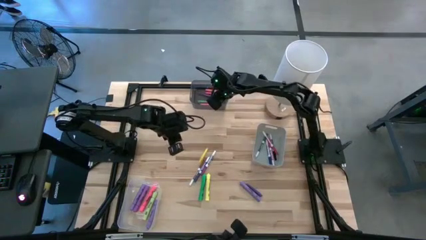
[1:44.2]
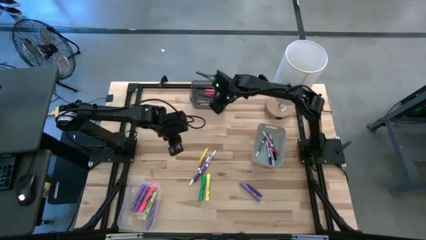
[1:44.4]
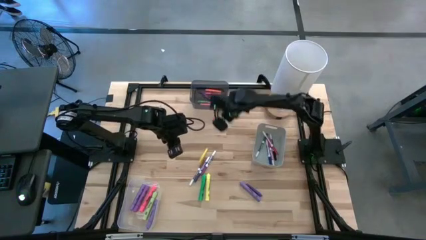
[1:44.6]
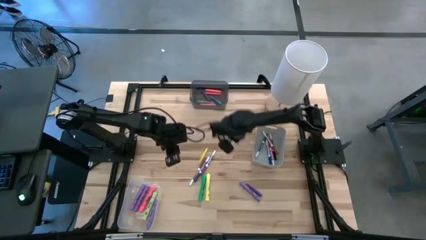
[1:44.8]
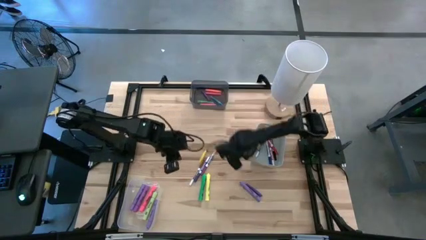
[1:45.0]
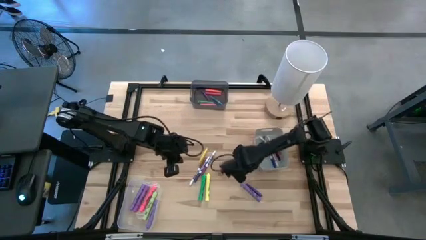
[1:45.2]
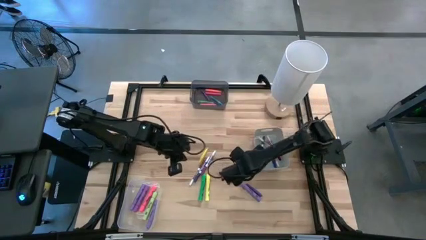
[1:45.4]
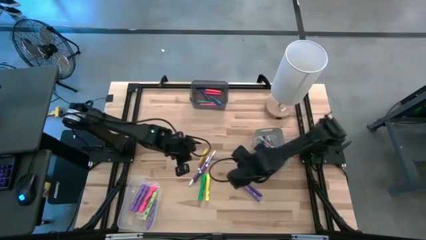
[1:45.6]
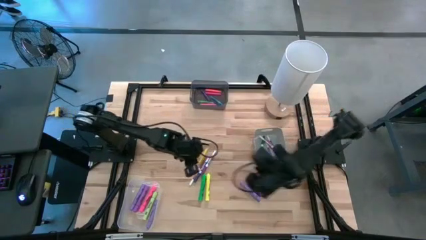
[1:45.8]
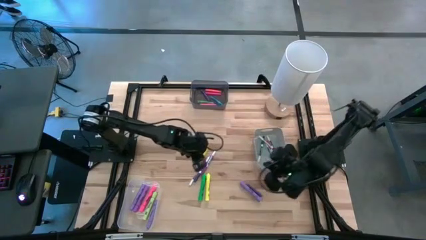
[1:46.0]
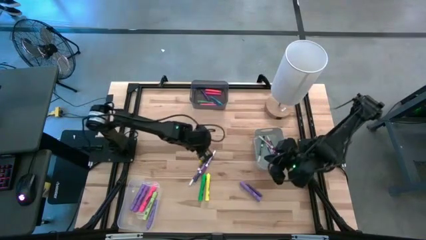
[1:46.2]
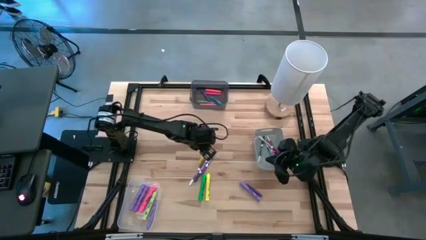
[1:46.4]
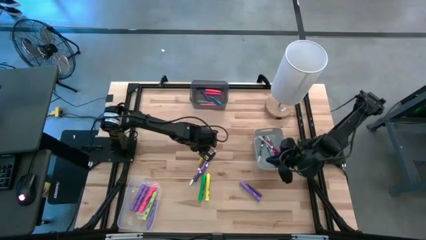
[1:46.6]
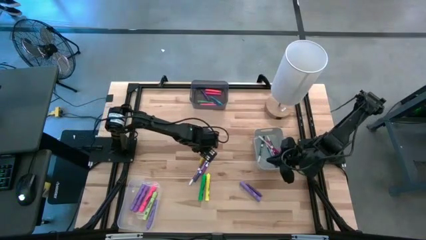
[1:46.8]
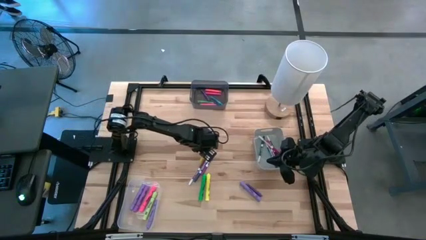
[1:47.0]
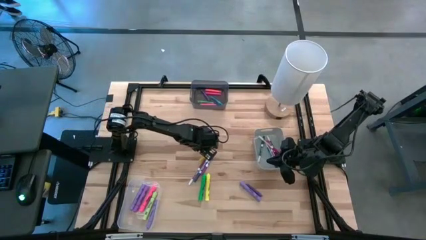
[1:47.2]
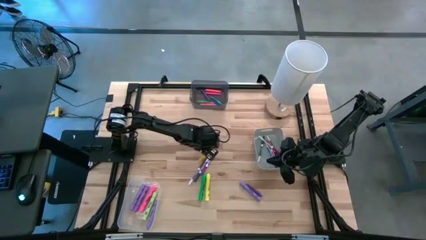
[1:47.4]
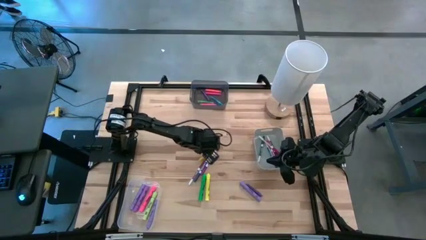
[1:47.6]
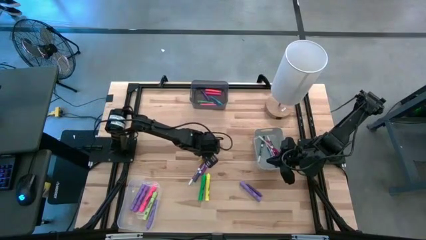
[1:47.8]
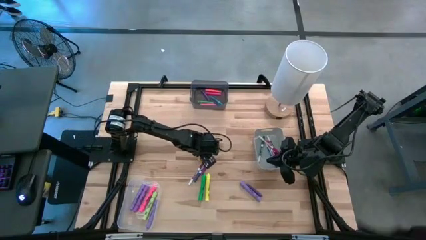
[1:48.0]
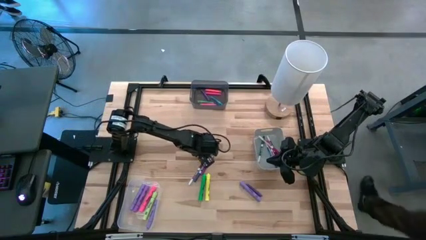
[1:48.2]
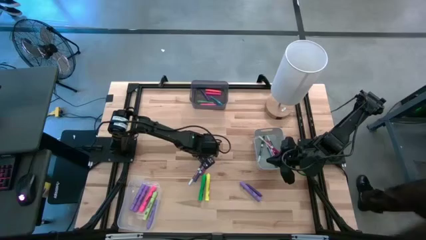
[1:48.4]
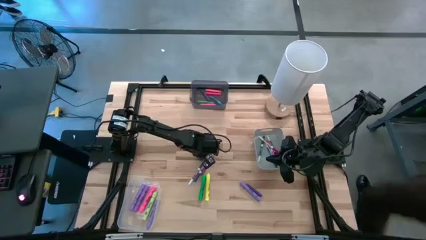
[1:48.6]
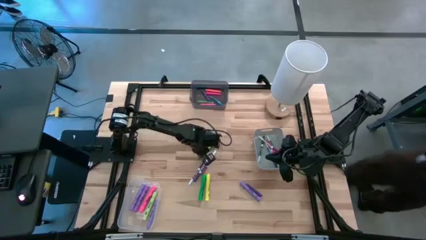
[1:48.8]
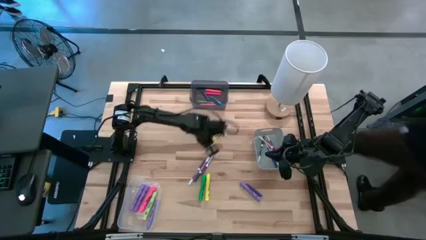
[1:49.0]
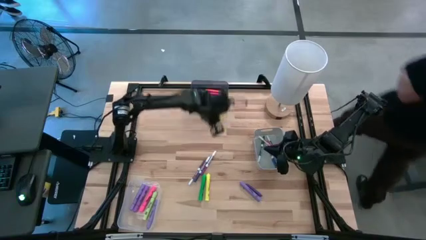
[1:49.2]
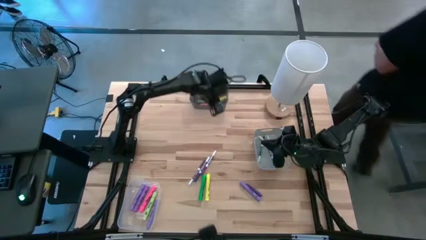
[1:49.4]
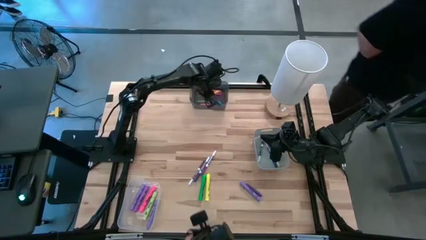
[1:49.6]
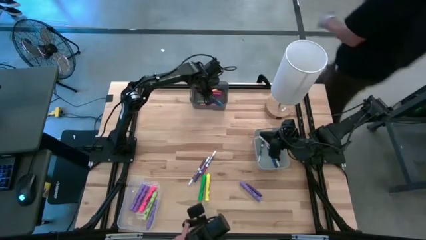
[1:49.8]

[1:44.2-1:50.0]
Task: Pick & Place Markers
Put the yellow pen into the black bin

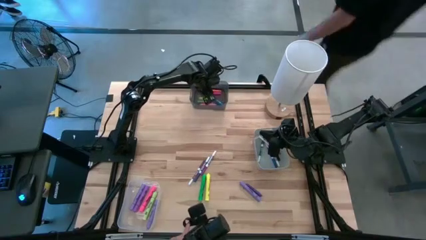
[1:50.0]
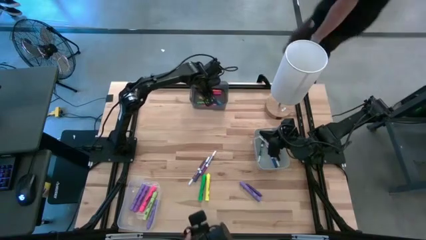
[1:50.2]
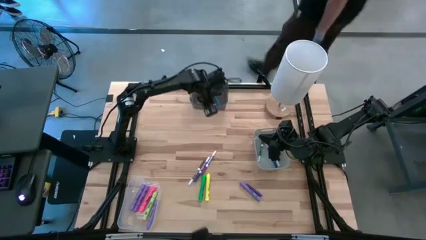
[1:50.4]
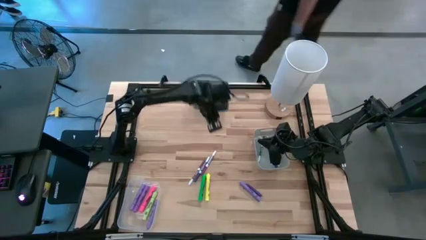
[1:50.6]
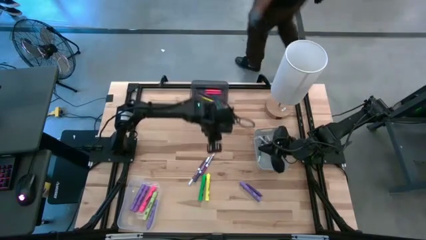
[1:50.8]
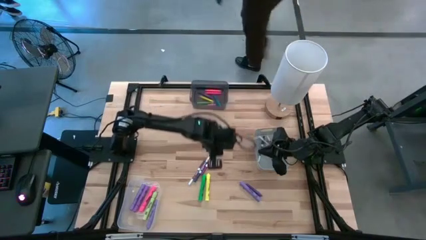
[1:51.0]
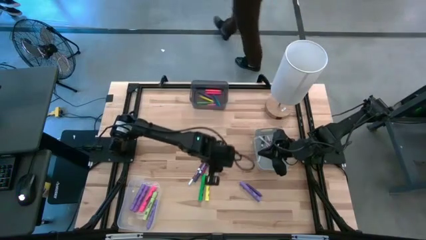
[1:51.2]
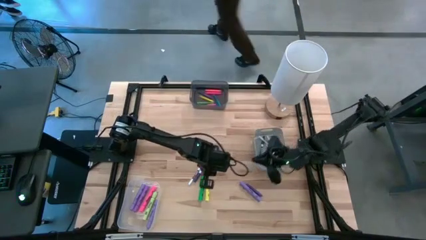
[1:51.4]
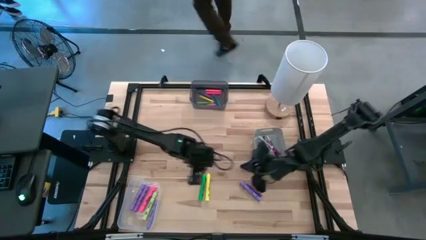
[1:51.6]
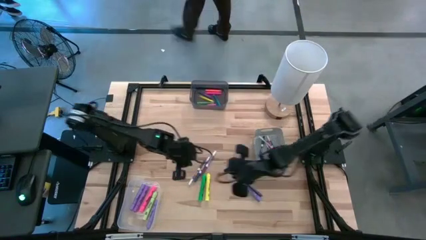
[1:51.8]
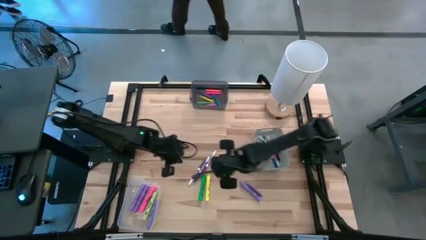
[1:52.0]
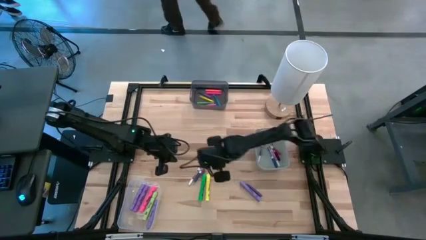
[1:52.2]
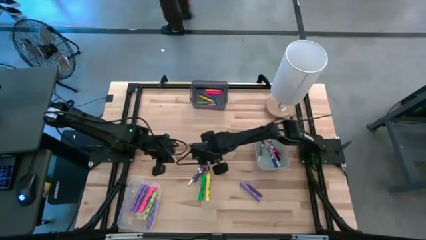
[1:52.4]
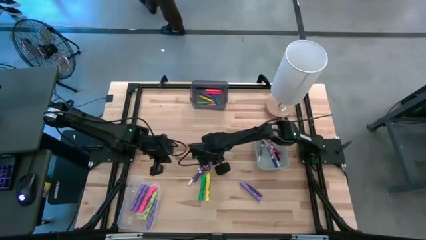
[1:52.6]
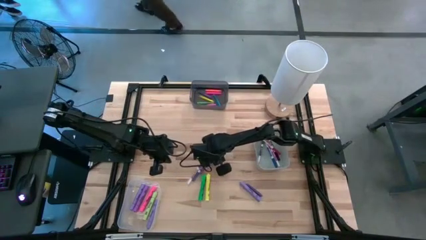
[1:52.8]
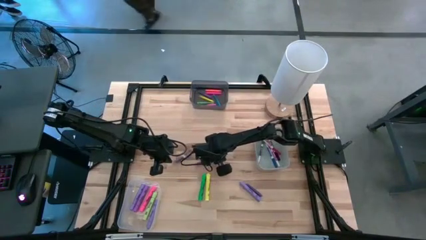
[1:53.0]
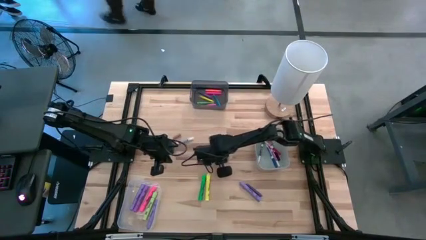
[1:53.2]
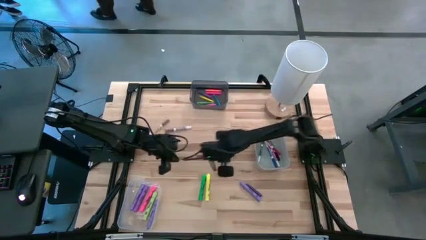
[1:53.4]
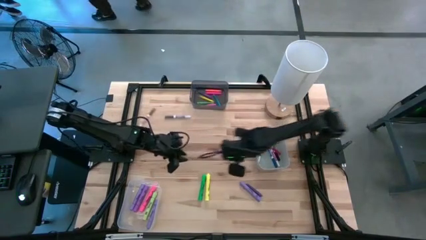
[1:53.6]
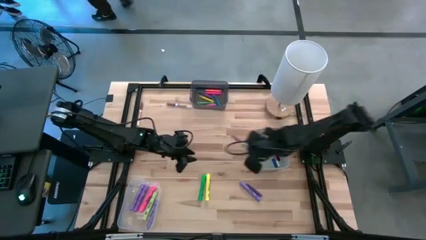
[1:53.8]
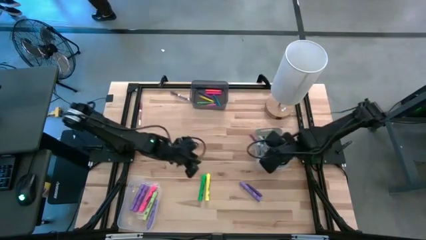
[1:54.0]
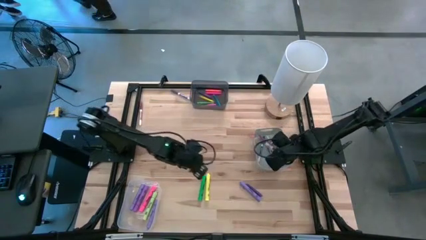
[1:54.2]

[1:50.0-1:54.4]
Put the dark red marker pen into the gray bin

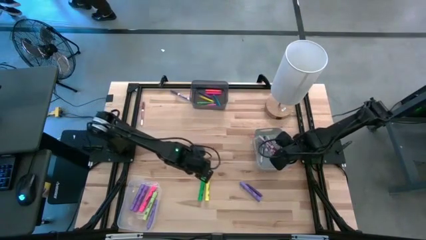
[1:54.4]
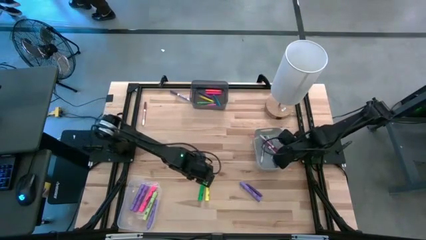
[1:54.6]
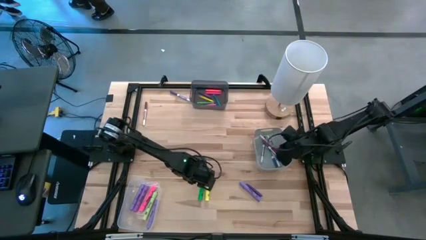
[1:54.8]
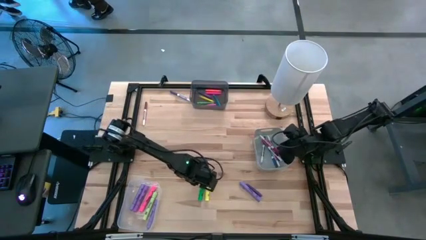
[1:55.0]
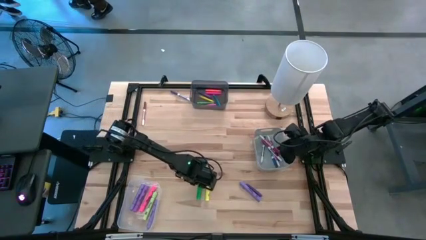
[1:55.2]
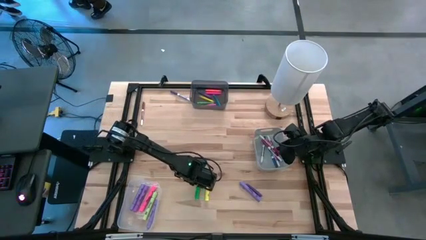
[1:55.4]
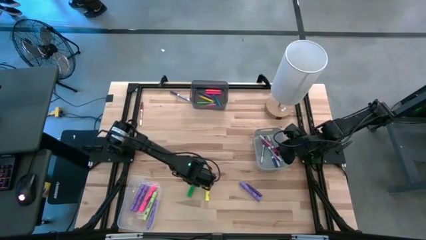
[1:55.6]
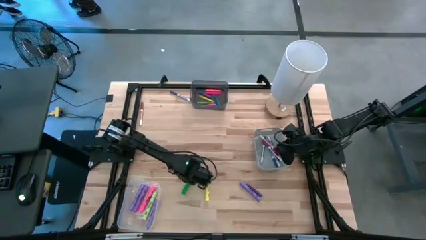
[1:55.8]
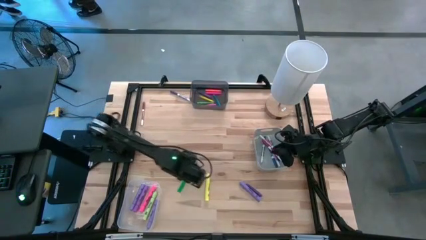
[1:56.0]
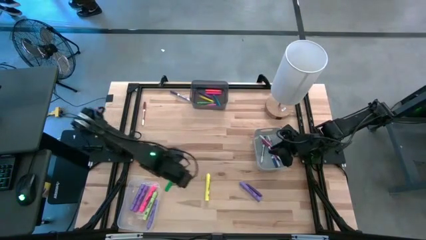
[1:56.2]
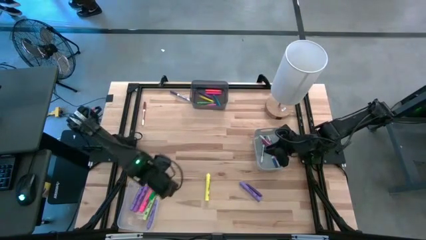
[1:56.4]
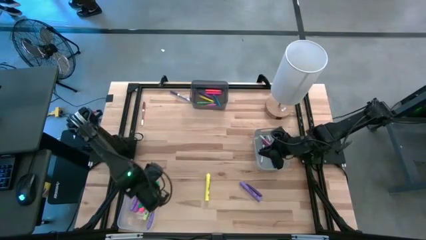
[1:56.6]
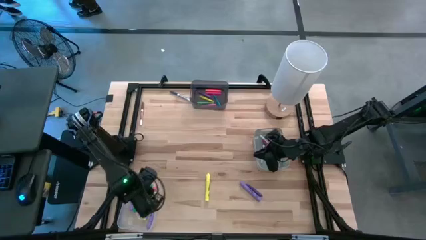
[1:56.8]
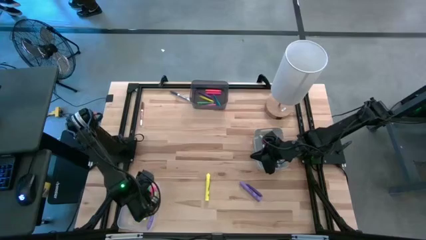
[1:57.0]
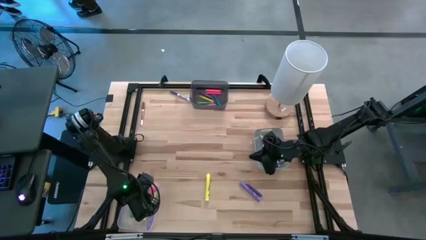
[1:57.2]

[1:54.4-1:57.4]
Put the green highlighter pen into the transparent bin

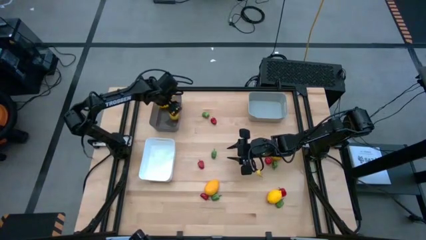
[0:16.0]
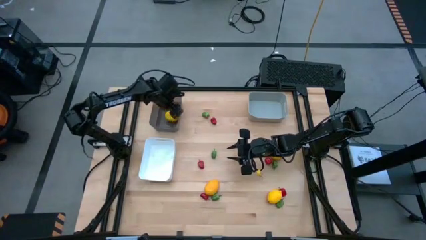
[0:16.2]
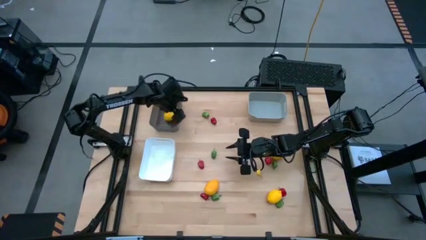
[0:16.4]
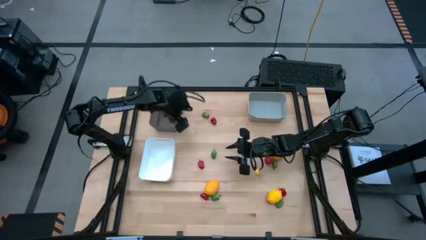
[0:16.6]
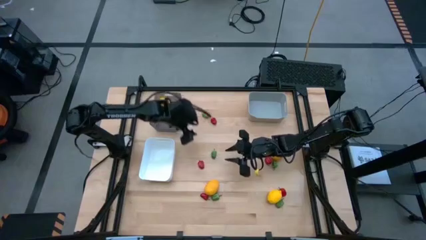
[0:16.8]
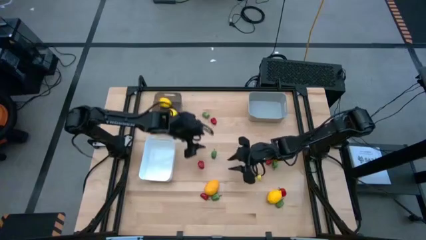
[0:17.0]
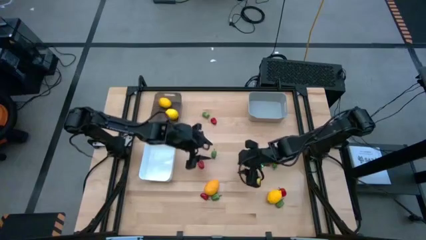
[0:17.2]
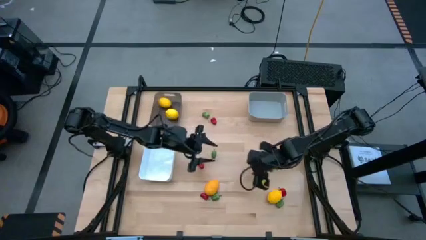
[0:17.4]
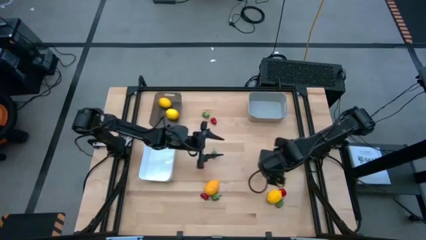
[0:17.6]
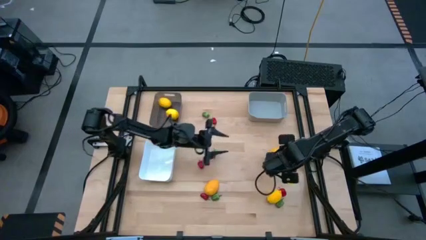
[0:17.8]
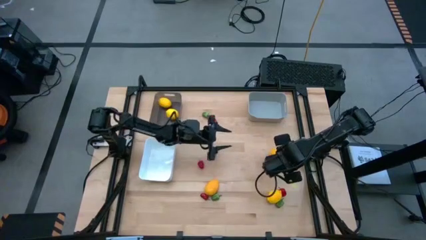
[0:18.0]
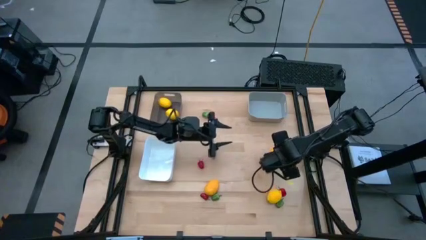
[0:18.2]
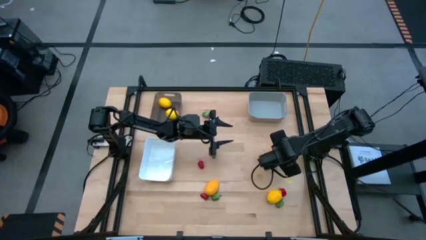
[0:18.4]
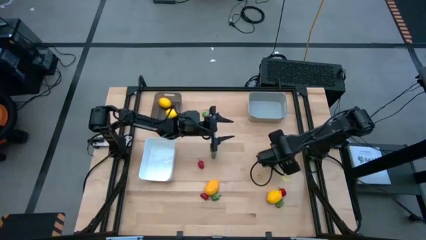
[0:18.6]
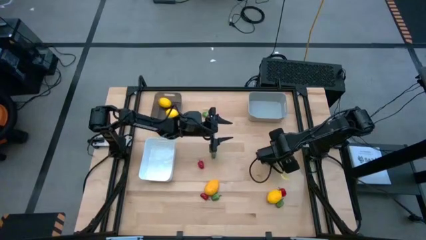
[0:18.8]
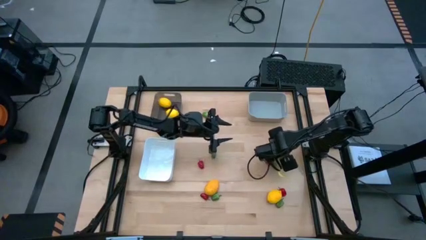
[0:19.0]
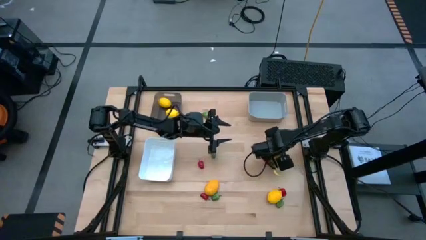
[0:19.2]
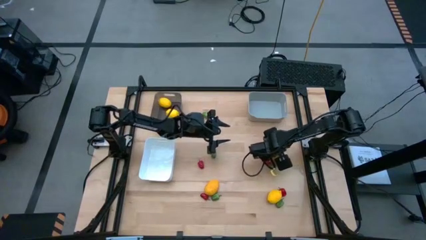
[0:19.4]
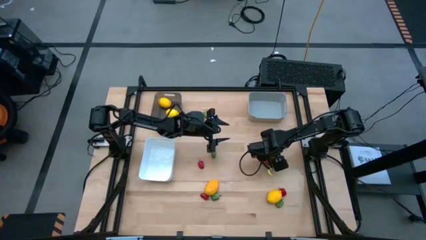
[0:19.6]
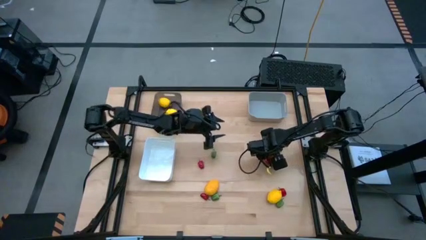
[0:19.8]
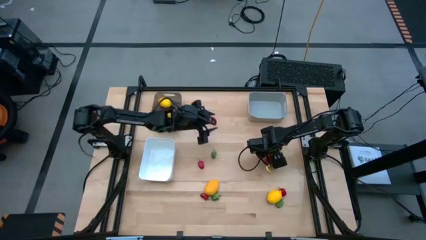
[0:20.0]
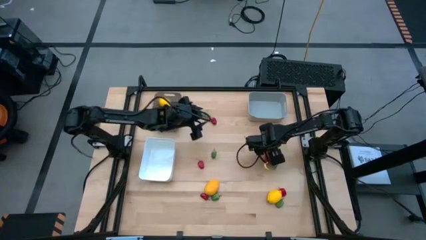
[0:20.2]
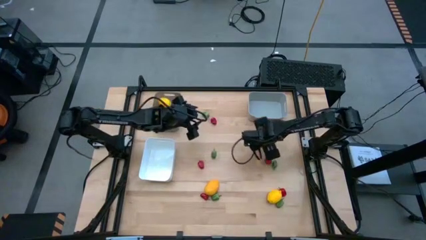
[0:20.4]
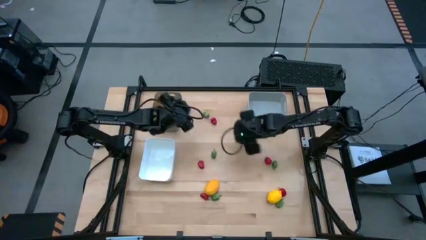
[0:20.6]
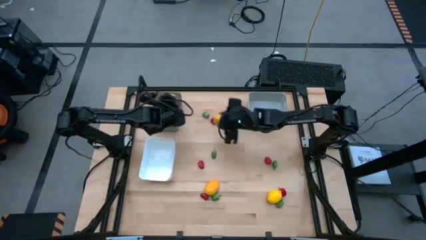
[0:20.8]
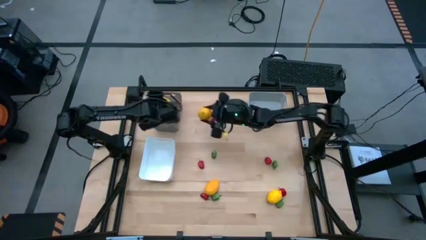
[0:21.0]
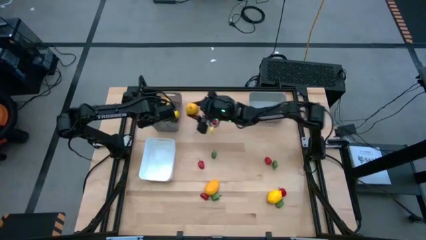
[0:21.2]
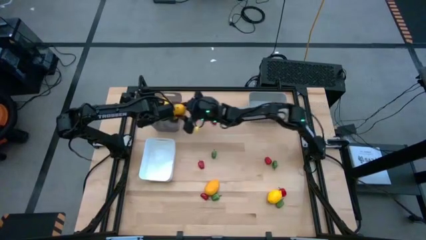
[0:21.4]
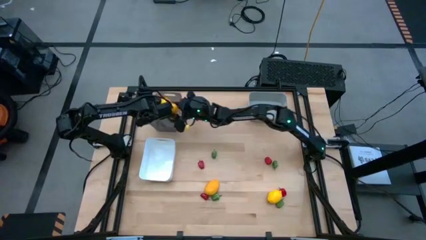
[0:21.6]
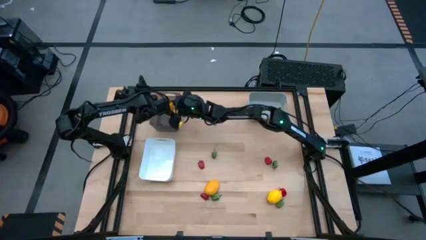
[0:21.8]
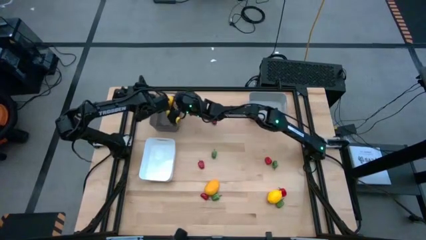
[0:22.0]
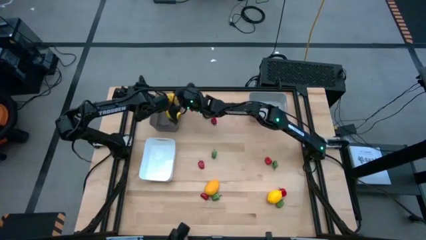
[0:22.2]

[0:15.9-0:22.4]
Task: Sort produce into baskets
Put the top right yellow lemon into the black bin
